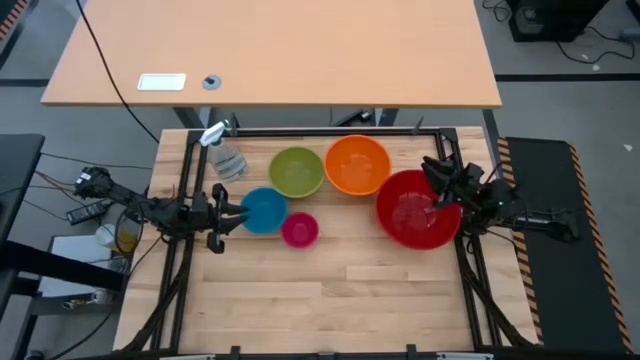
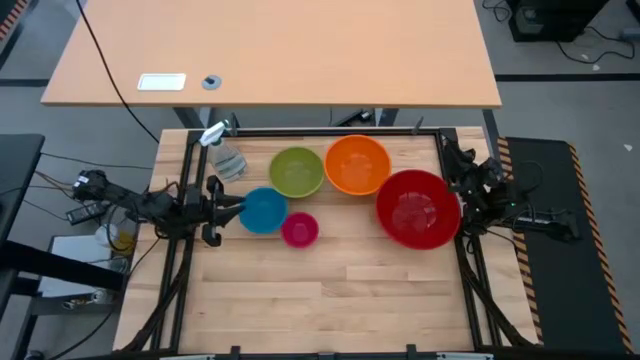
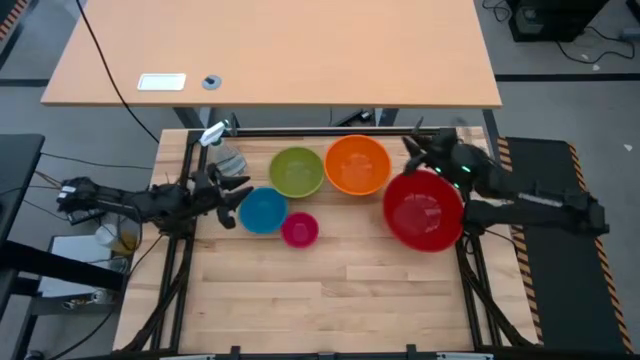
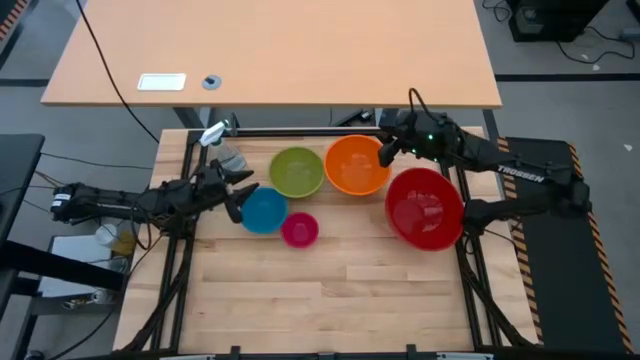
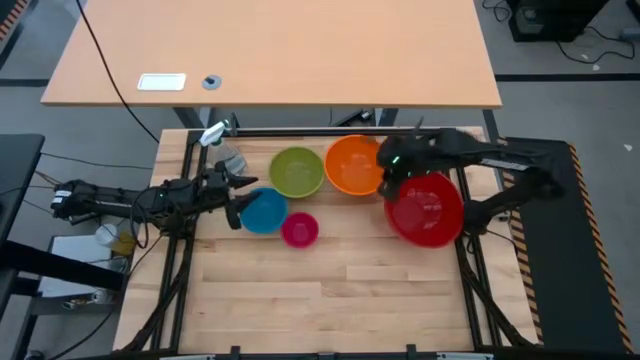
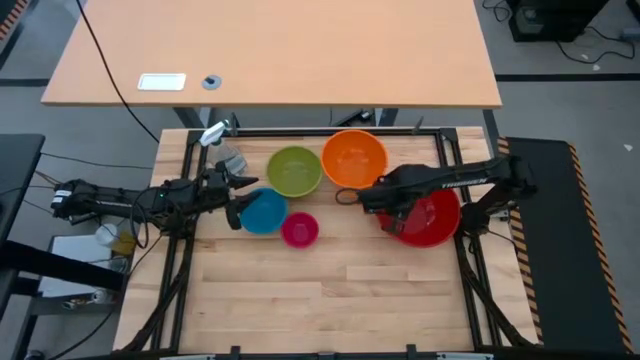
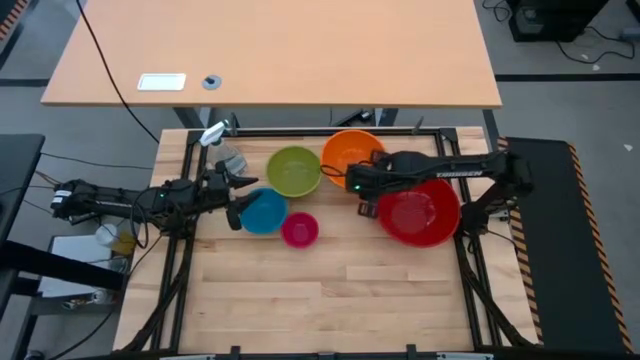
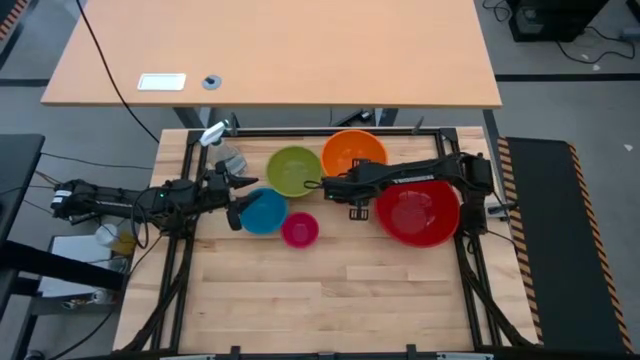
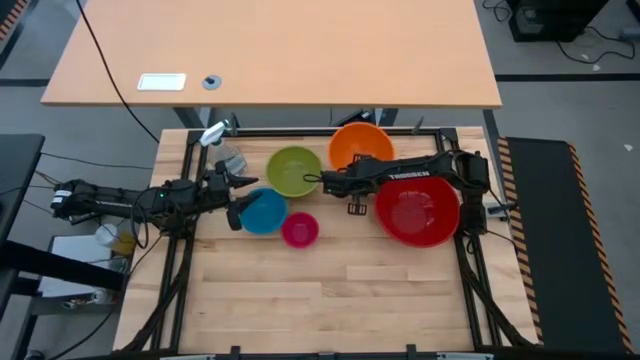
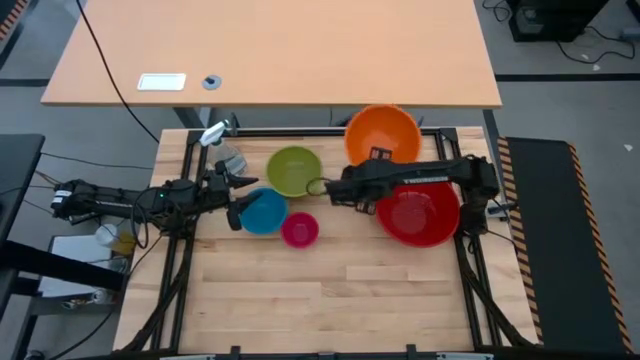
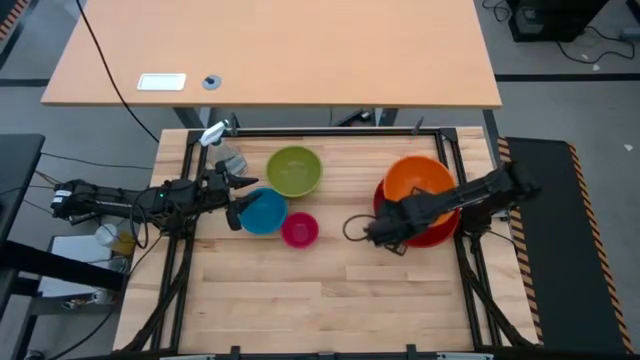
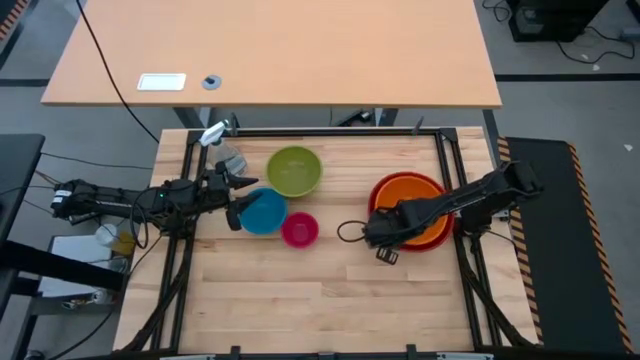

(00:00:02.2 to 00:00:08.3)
Stack the orange bowl on the top of the red bowl

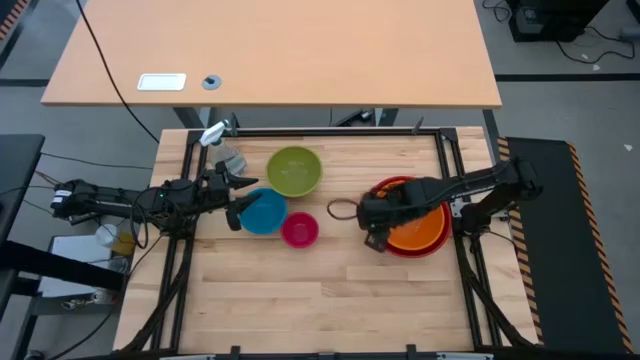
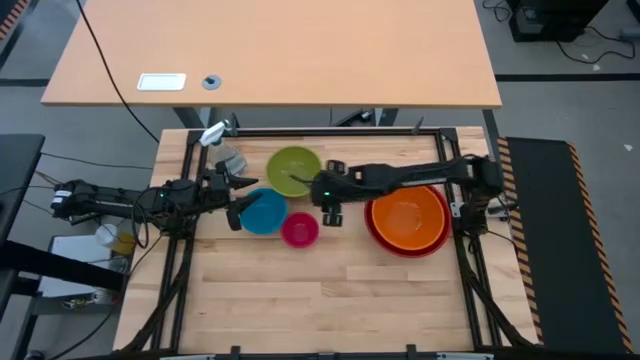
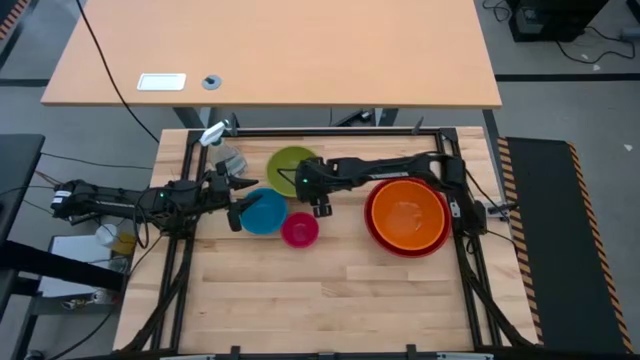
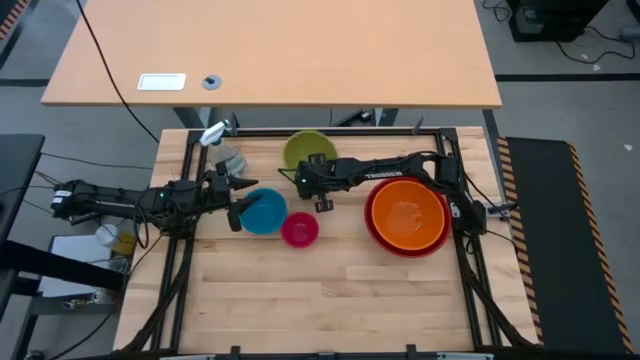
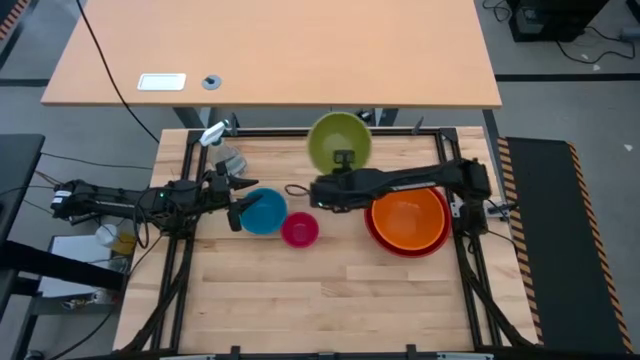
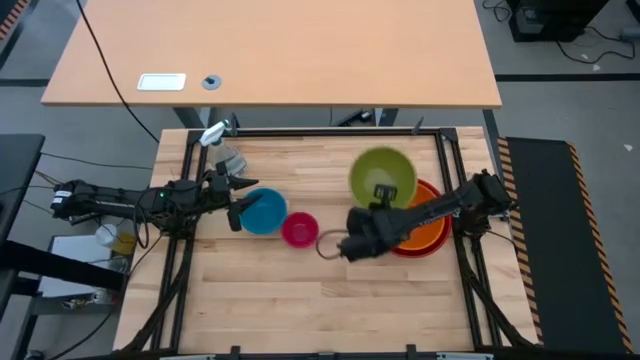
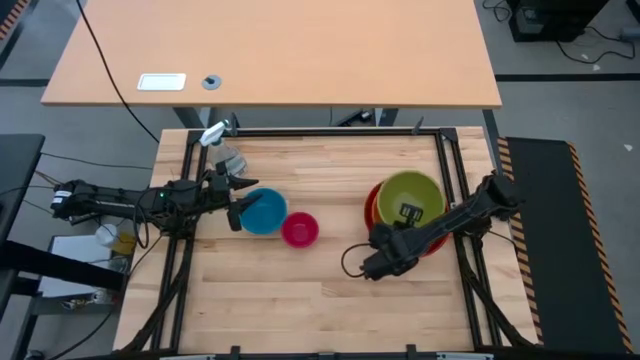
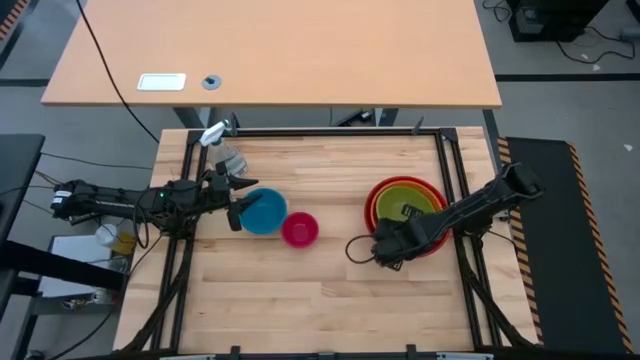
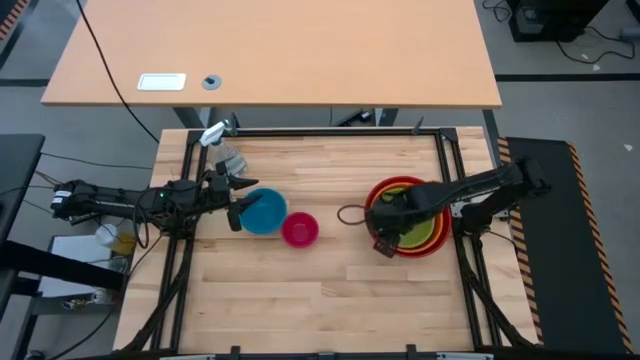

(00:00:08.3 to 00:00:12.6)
Stack the green bowl on the top of the orange bowl

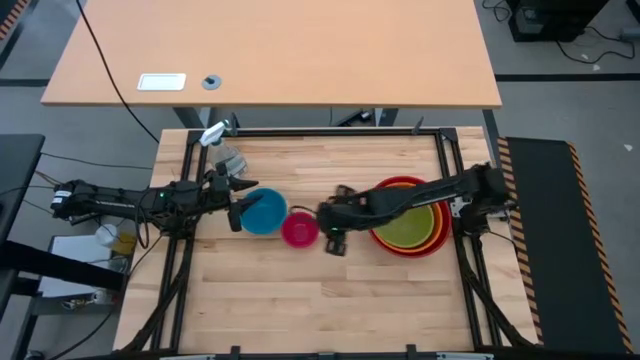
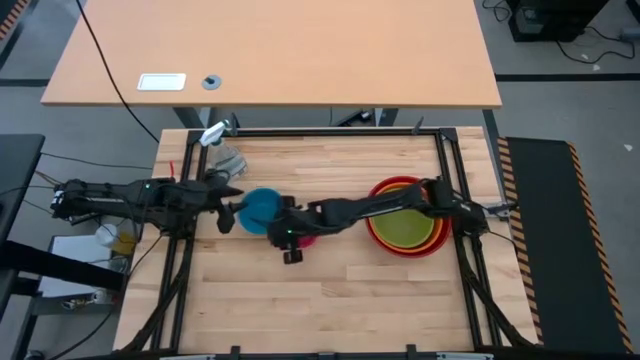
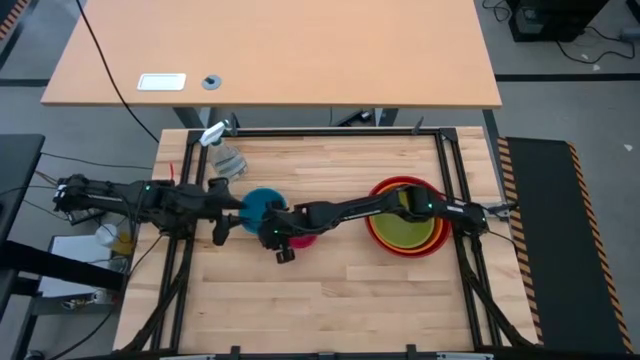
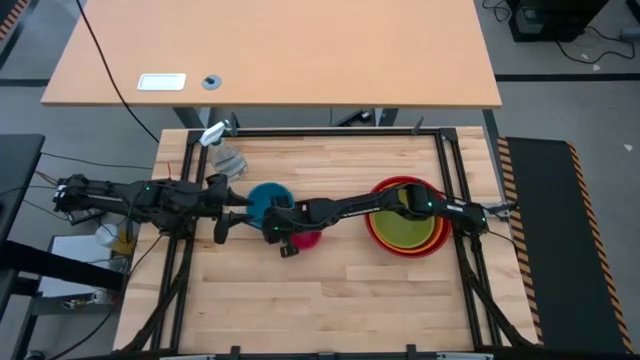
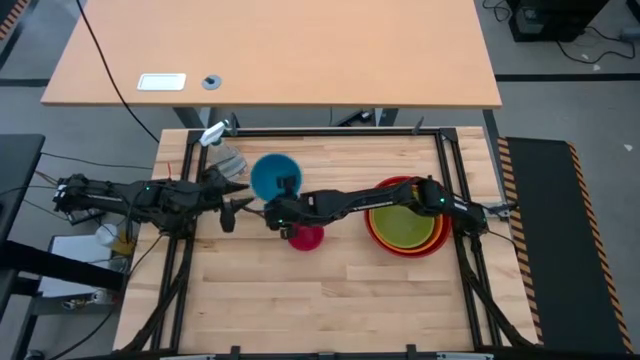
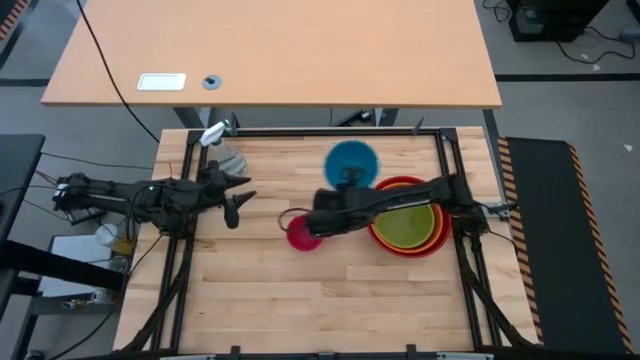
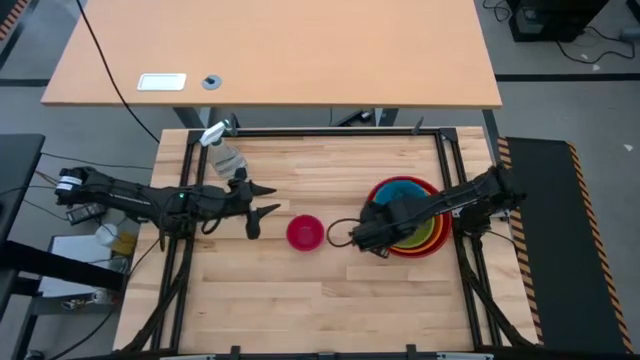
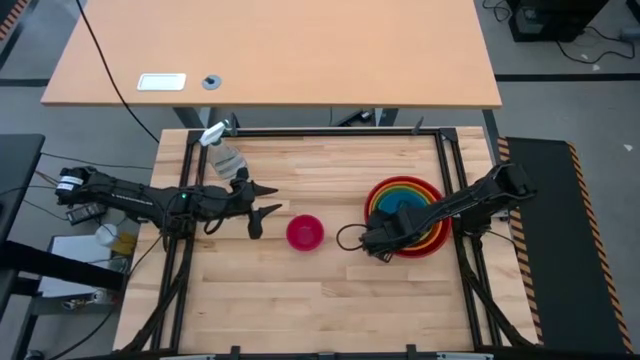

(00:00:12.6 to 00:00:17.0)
Stack the blue bowl on the top of the green bowl

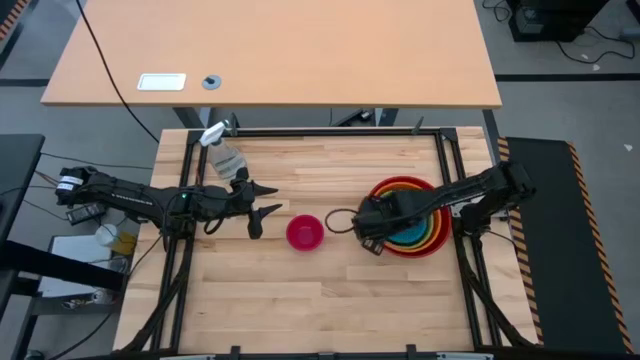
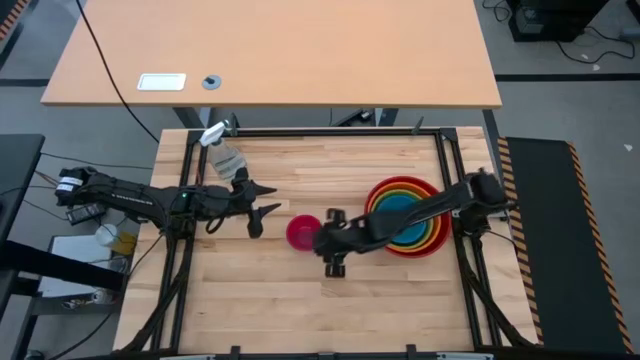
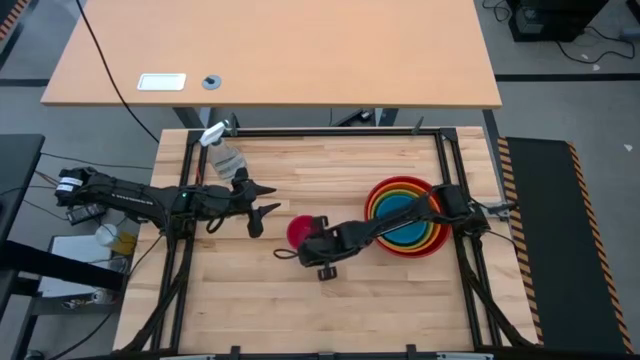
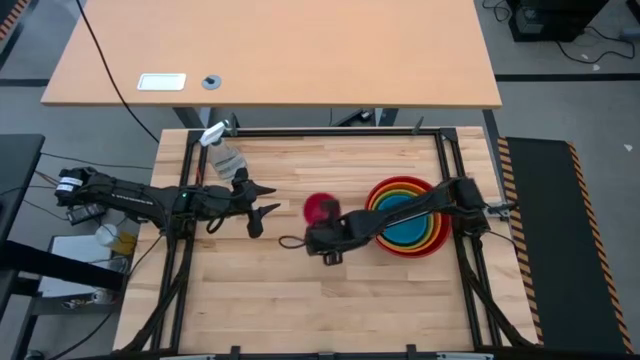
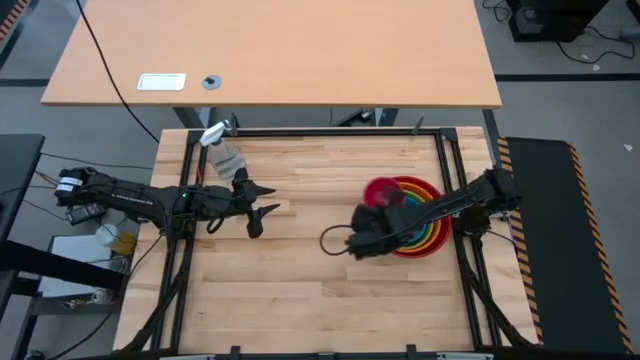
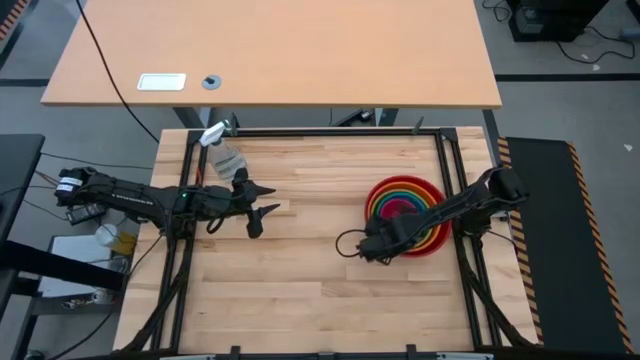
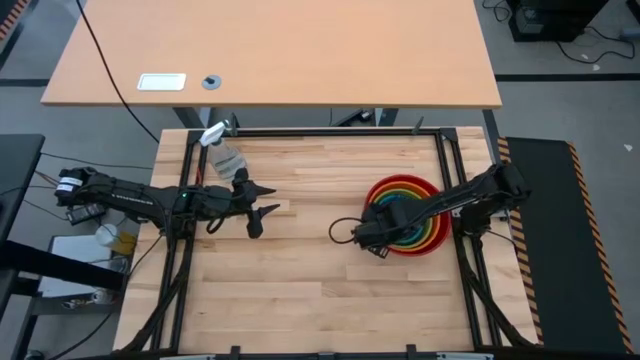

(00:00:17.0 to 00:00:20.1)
Stack the pink bowl on the top of the blue bowl
